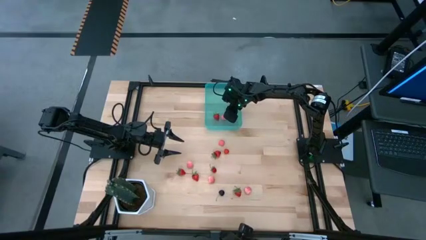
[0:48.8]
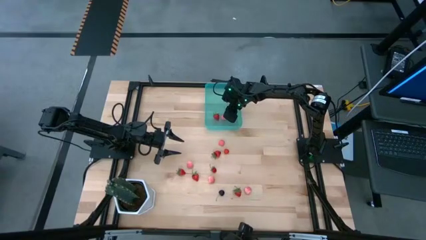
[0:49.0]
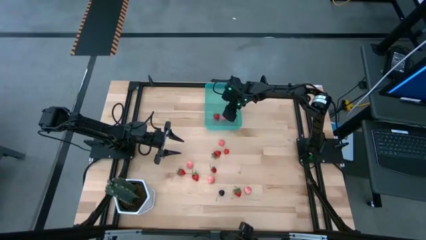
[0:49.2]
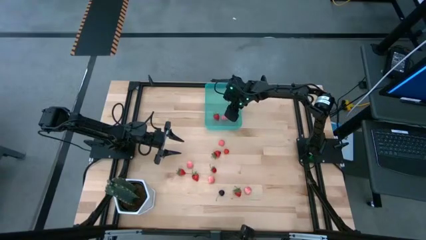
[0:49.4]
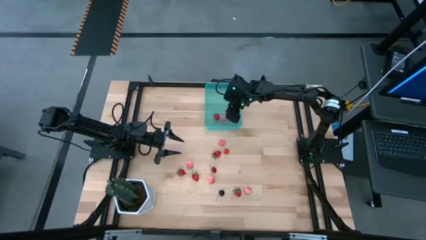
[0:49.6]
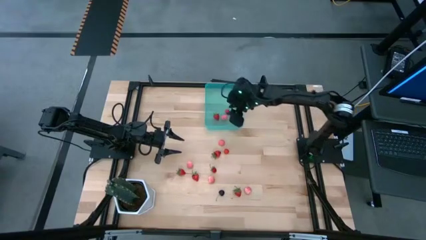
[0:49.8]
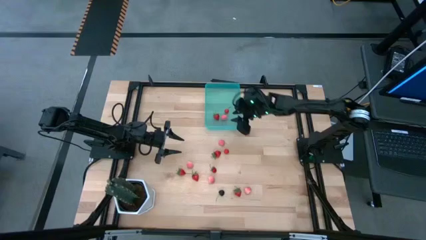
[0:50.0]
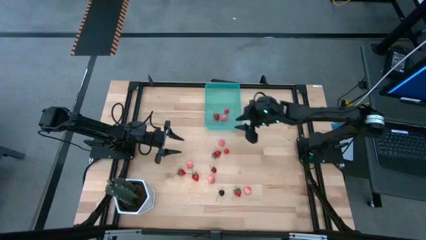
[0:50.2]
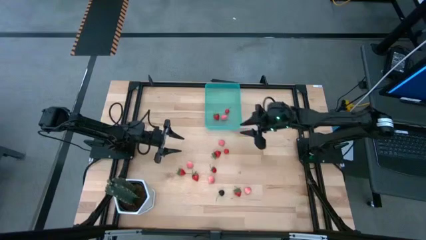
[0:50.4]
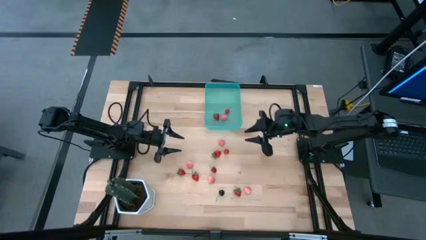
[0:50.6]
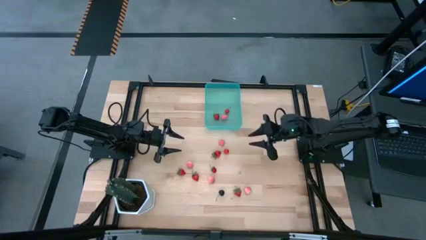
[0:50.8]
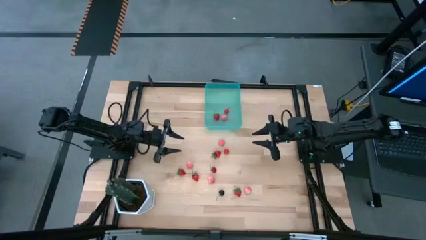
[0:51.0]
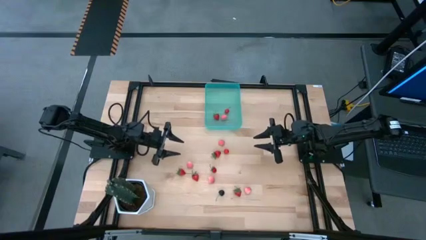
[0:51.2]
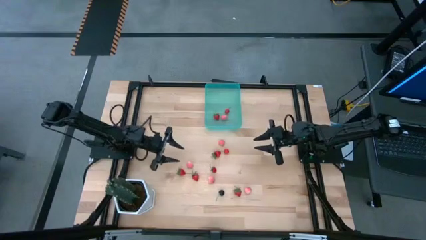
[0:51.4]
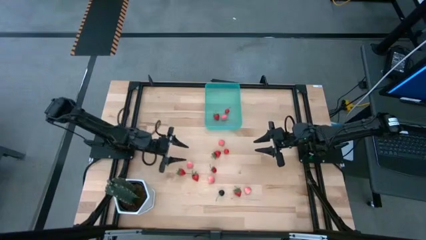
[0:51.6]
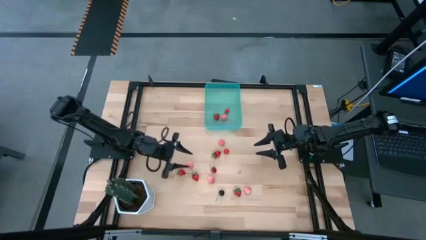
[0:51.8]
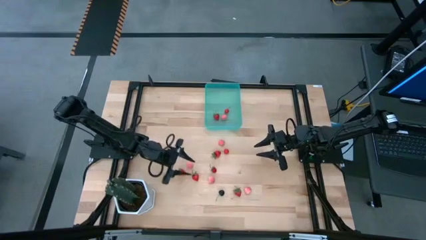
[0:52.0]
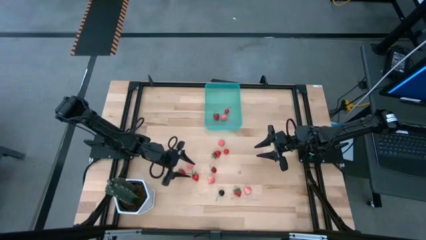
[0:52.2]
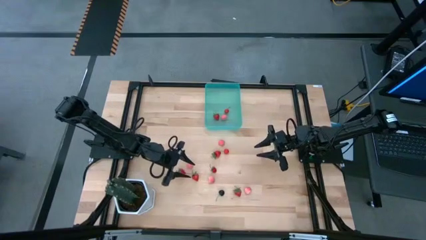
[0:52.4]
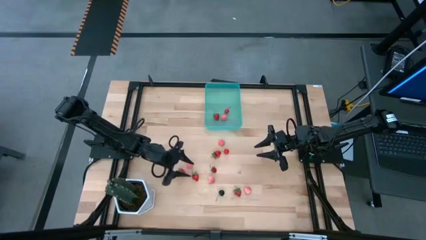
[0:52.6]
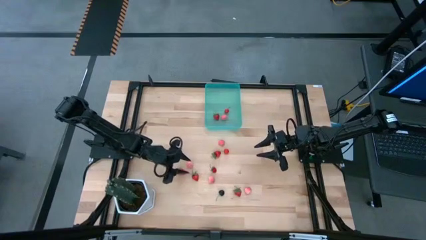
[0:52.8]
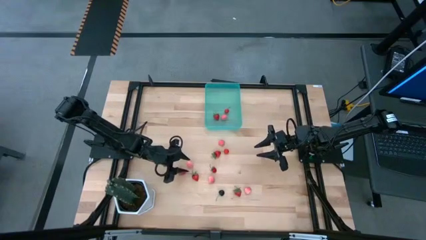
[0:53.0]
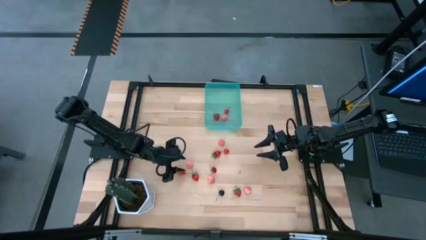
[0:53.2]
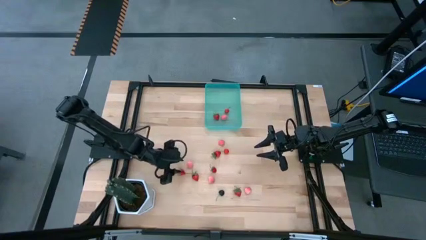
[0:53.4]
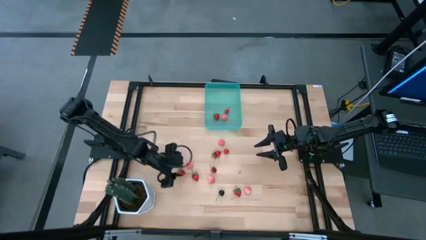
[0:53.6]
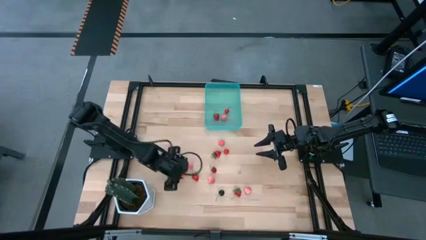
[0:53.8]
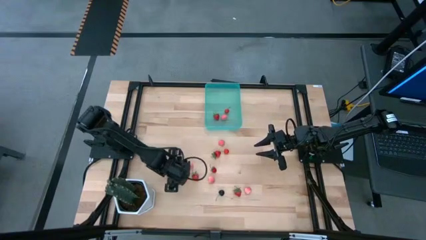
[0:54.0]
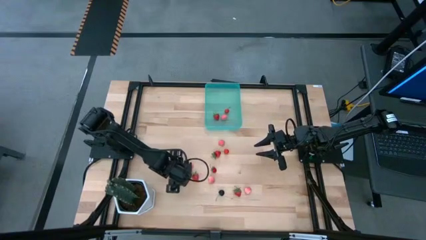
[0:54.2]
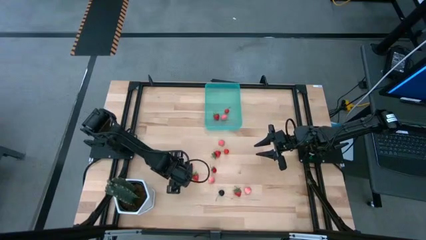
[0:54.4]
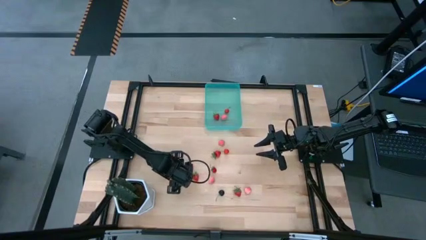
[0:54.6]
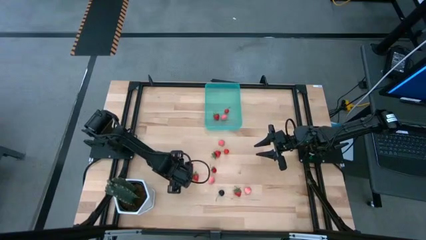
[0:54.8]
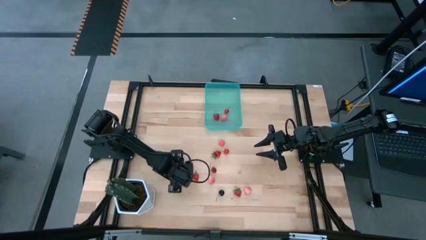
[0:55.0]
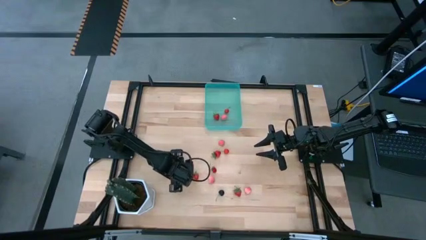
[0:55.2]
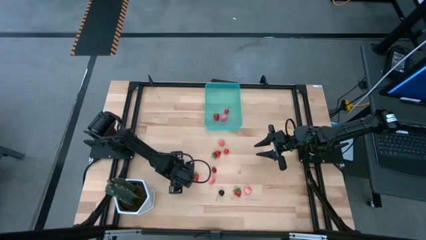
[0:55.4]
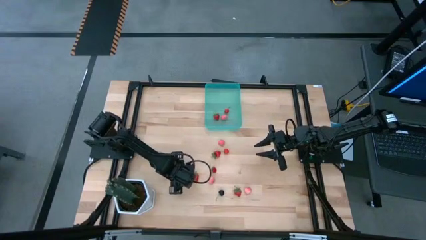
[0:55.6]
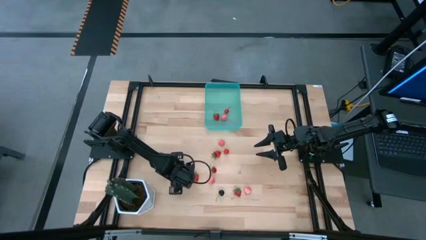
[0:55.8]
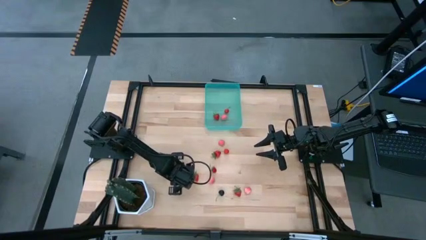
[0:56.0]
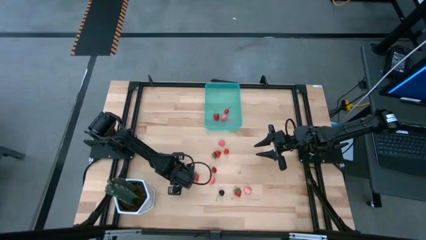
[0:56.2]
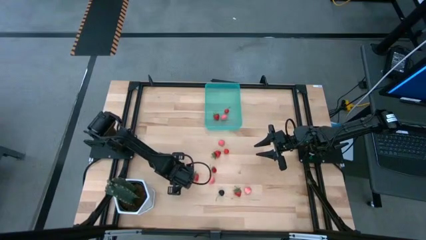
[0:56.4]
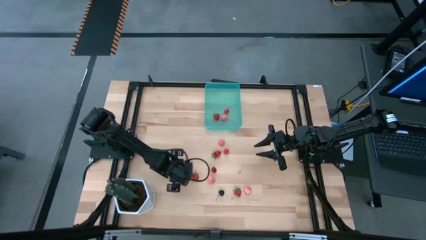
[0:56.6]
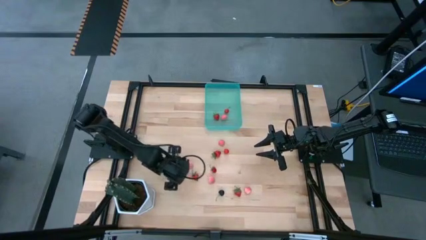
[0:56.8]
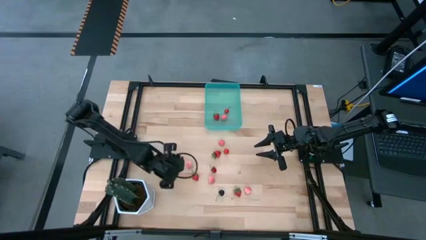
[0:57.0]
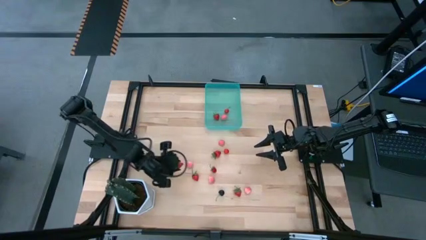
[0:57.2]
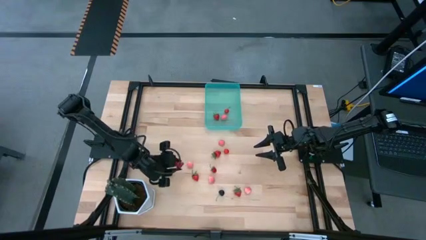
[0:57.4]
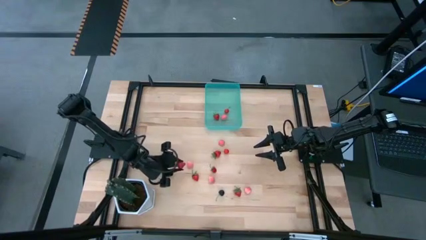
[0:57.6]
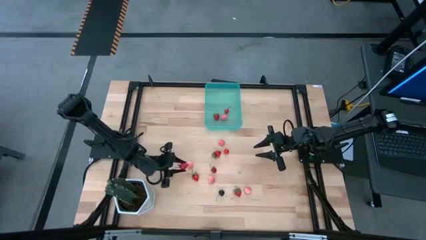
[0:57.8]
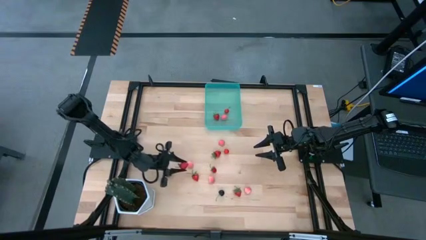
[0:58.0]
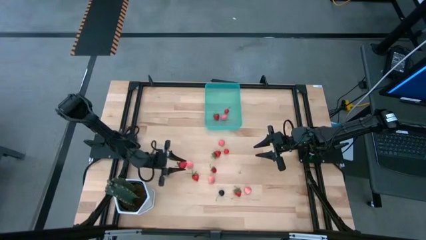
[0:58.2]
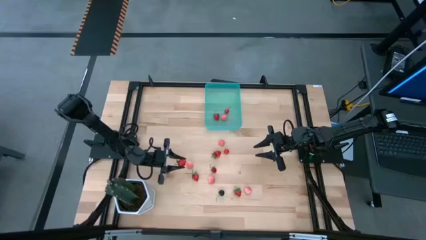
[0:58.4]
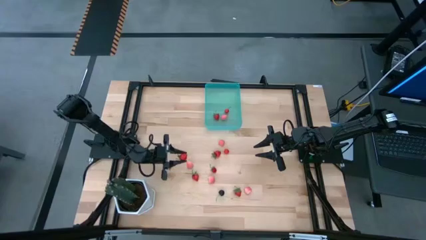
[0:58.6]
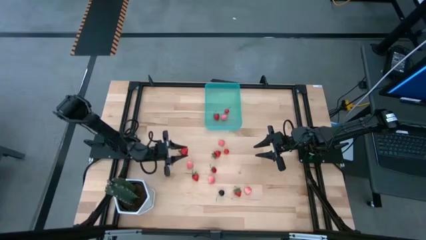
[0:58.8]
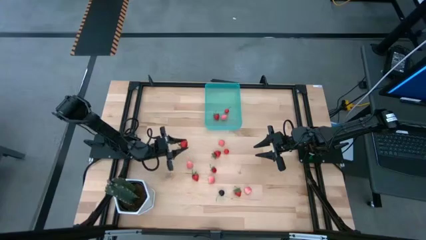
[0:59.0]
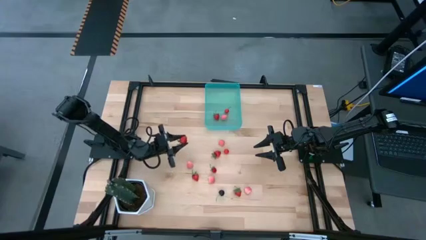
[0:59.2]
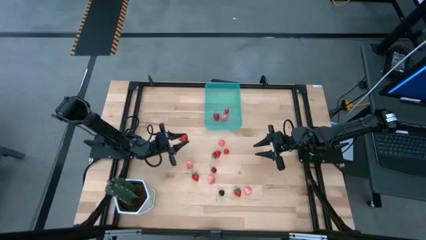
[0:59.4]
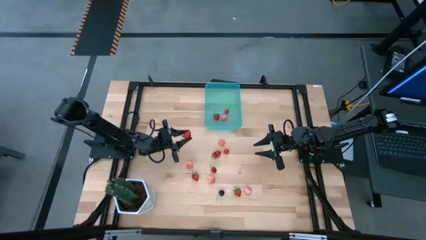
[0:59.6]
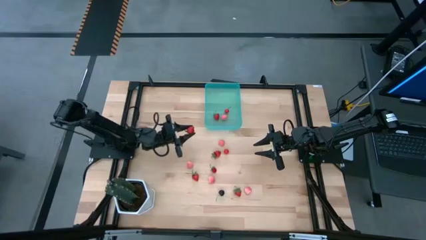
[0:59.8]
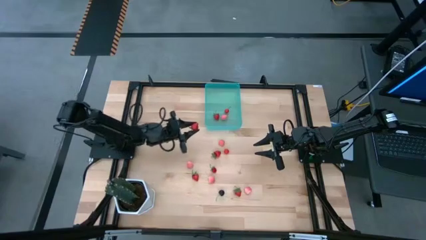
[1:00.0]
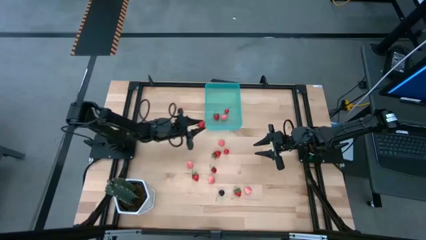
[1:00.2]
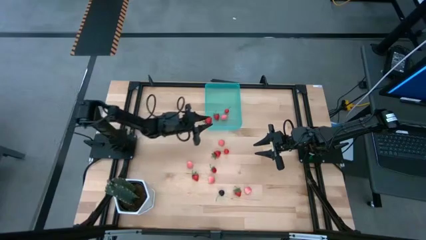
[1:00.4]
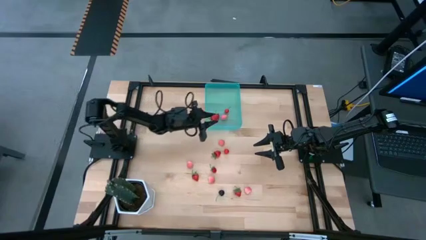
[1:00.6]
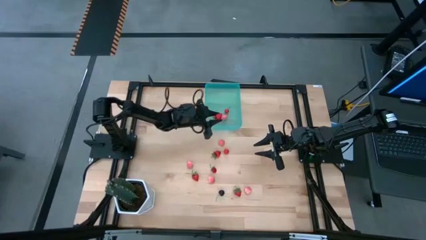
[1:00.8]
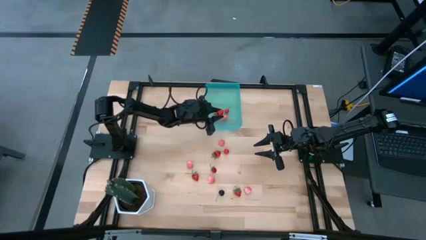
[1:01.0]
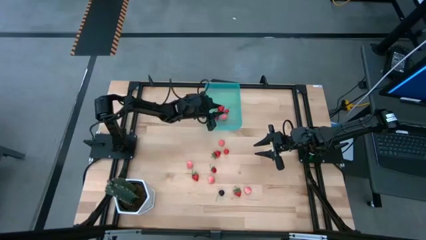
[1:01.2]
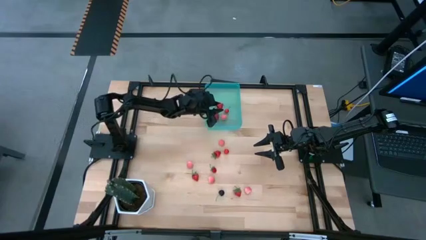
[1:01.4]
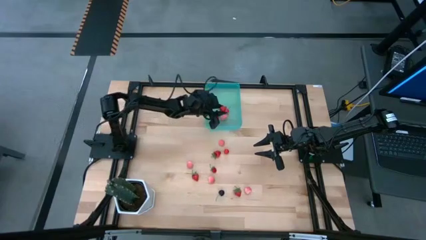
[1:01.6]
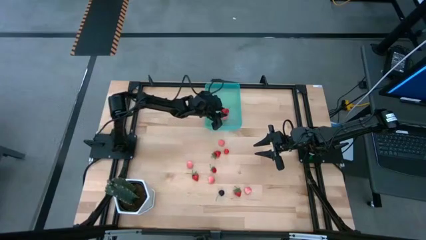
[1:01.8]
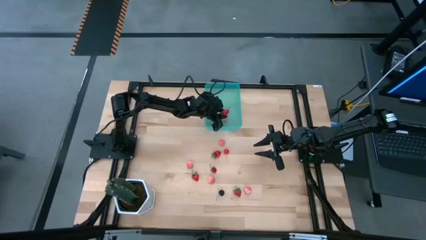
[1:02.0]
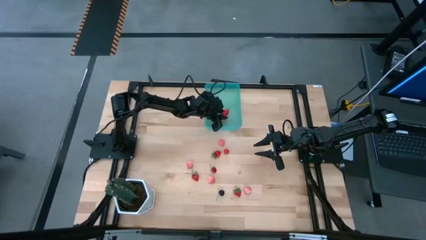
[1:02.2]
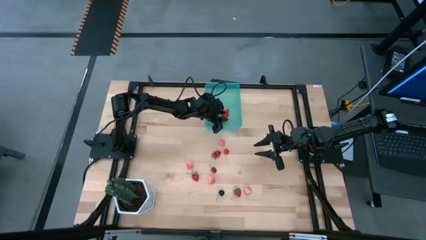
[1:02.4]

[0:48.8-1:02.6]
Task: Pick and placing Produce into tupperware
Put the red strawberry into the blue bin

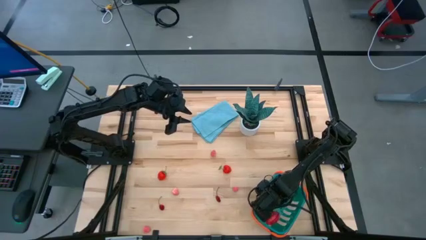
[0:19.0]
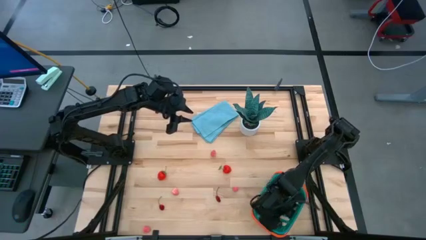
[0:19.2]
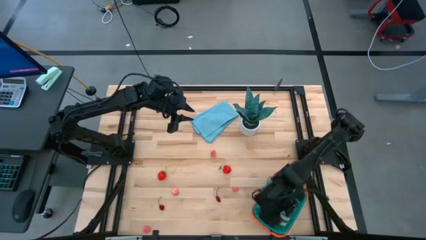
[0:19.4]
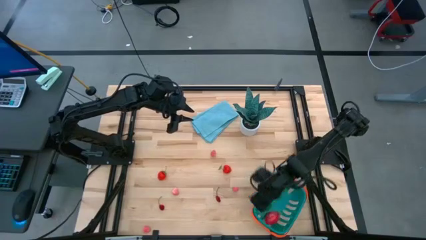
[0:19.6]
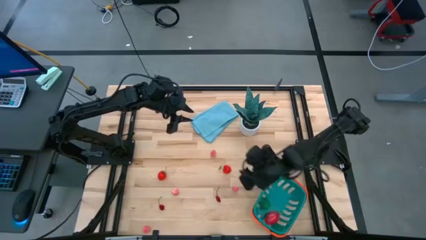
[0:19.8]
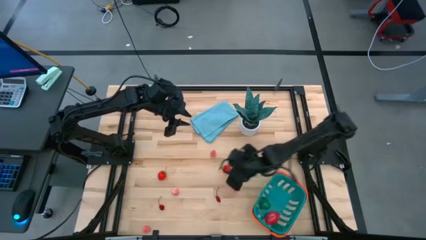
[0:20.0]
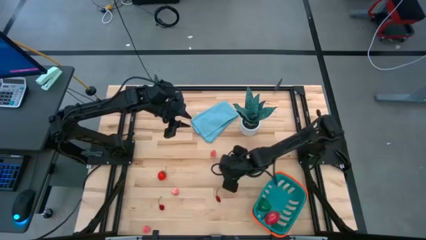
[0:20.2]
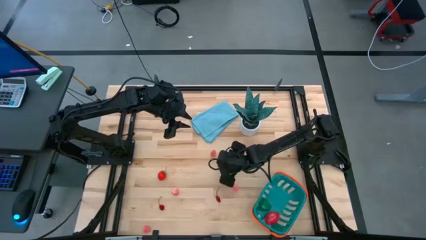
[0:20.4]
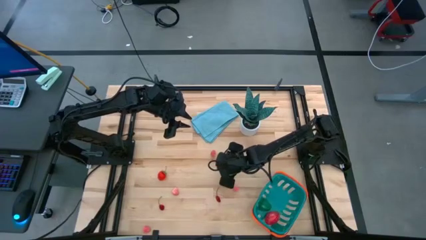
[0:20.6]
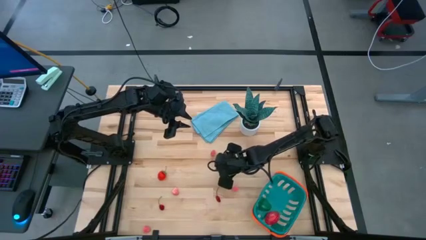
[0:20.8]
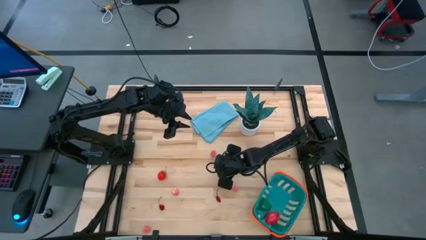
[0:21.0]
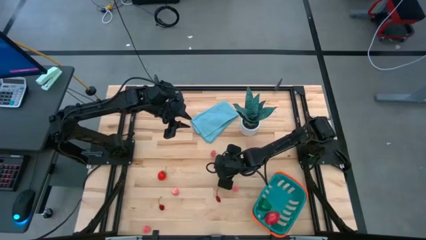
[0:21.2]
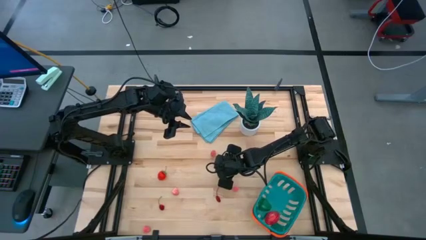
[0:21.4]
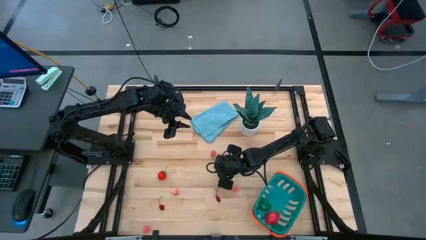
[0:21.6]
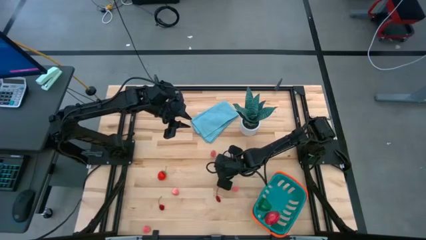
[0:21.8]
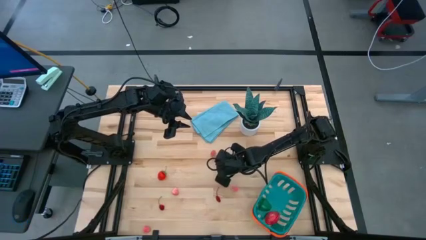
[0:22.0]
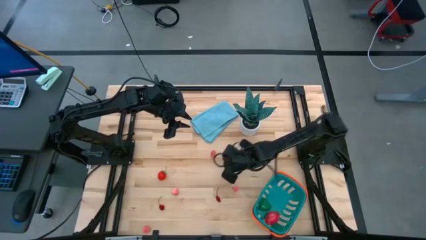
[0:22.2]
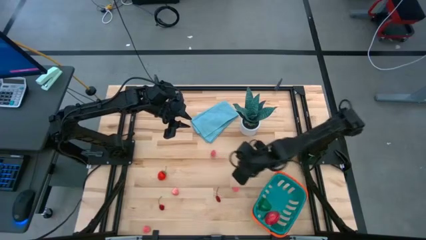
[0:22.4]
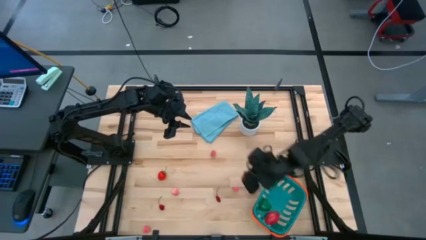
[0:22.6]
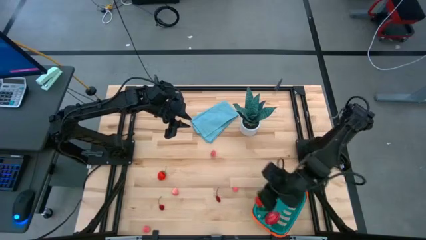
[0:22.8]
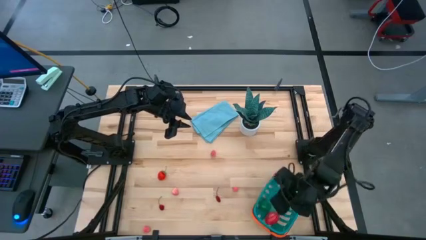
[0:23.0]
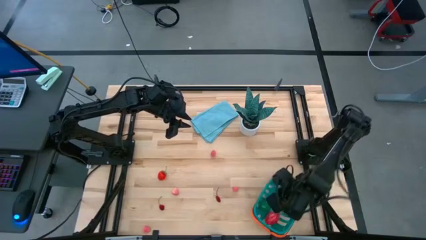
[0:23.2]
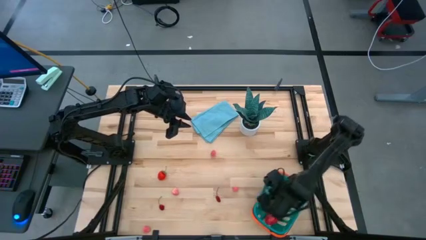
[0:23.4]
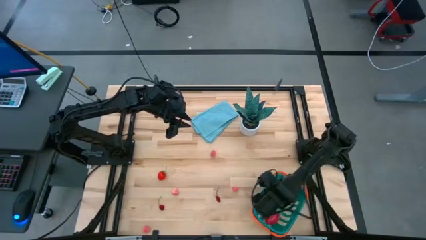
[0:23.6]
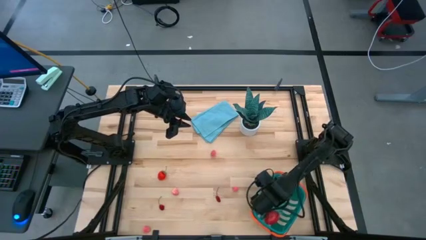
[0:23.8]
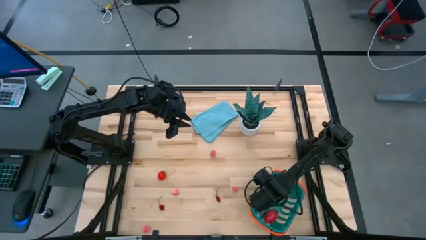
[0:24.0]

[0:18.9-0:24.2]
Task: Pick and placing Produce into tupperware
Put the right strawberry into the basket
